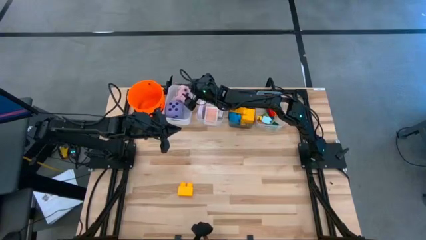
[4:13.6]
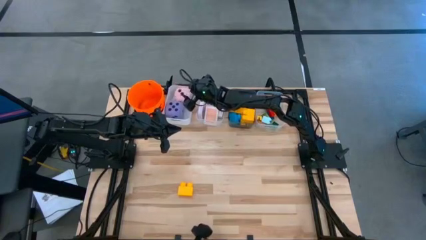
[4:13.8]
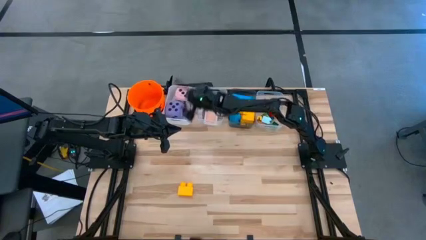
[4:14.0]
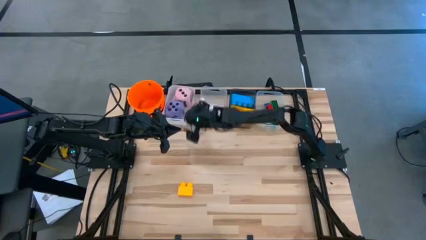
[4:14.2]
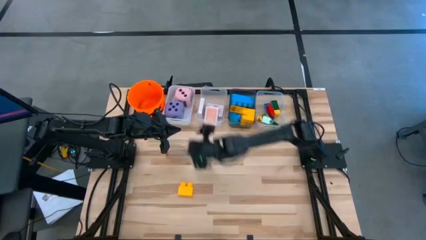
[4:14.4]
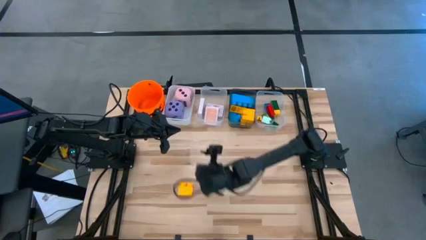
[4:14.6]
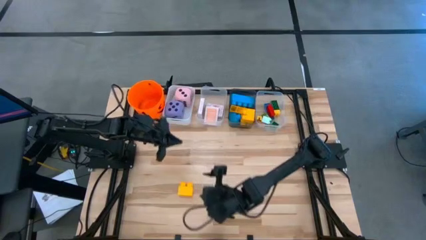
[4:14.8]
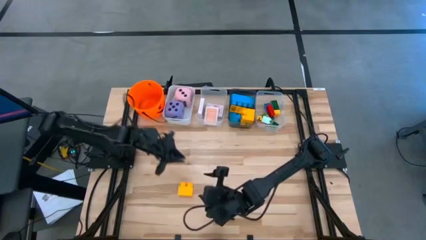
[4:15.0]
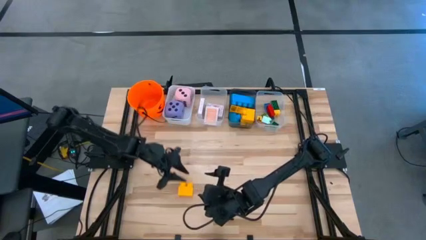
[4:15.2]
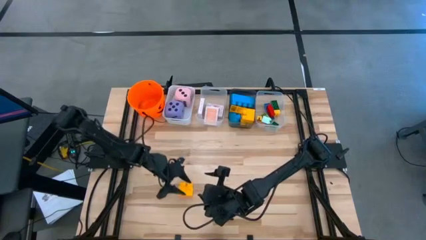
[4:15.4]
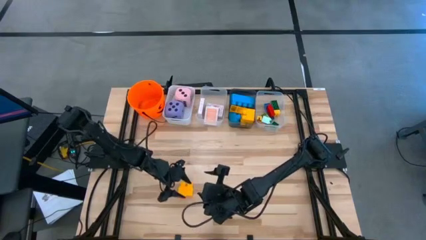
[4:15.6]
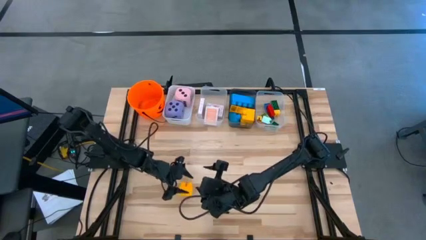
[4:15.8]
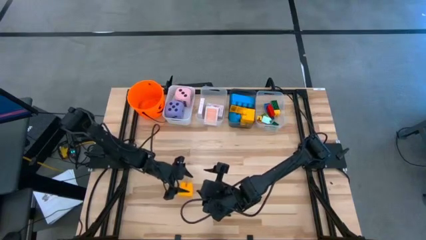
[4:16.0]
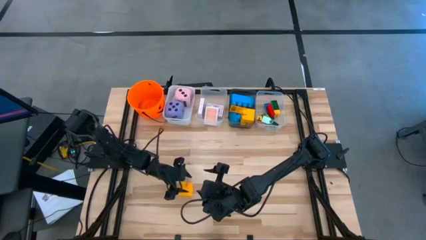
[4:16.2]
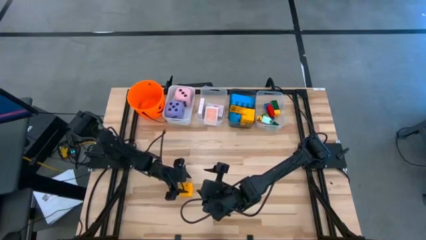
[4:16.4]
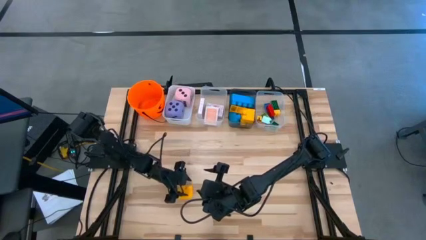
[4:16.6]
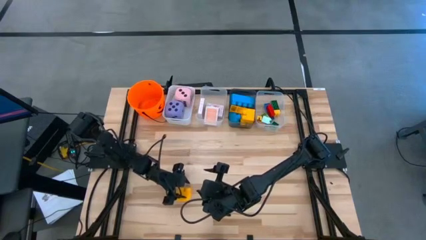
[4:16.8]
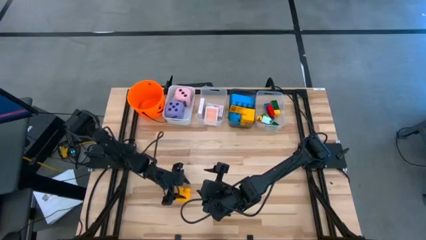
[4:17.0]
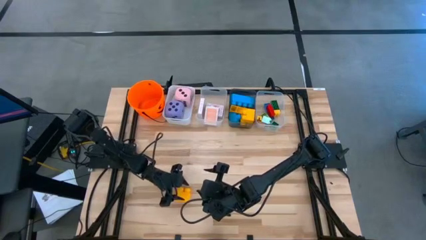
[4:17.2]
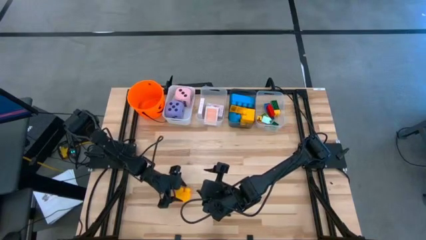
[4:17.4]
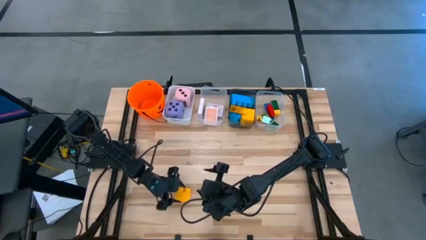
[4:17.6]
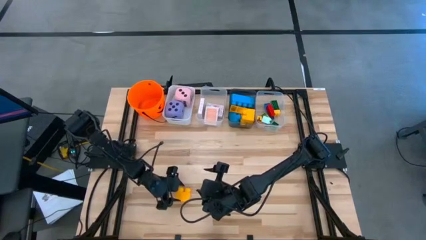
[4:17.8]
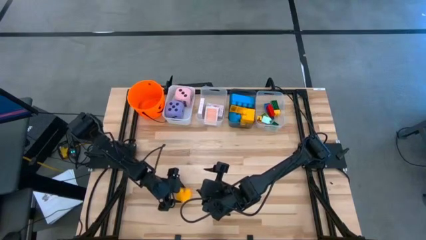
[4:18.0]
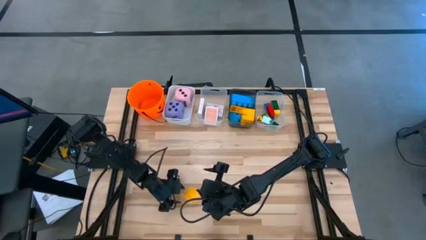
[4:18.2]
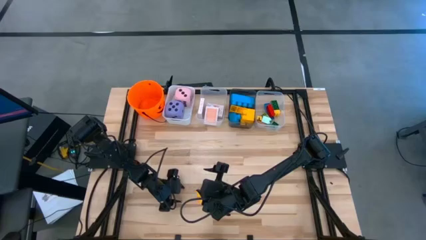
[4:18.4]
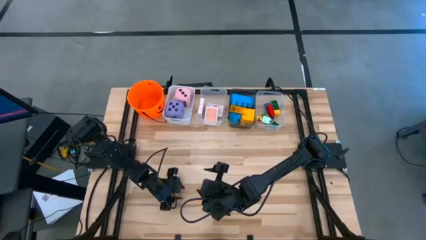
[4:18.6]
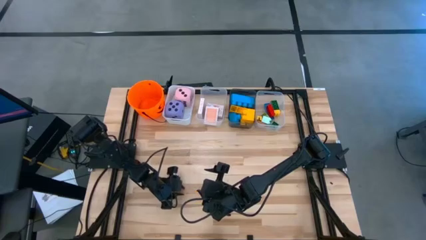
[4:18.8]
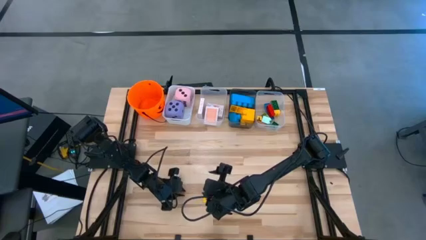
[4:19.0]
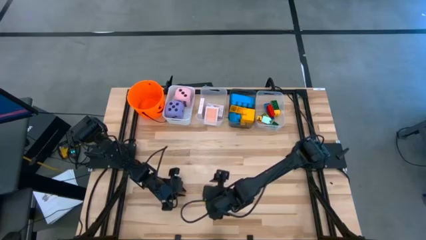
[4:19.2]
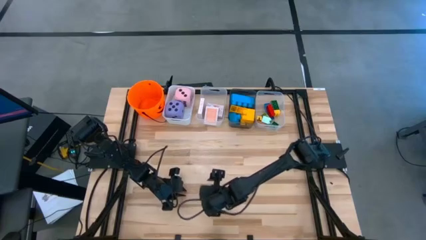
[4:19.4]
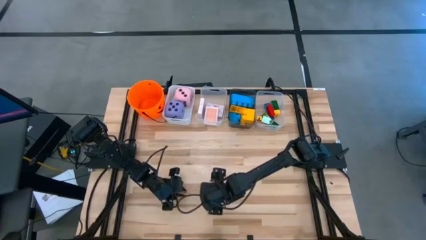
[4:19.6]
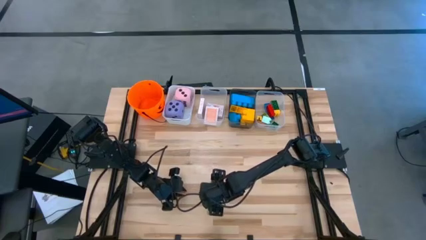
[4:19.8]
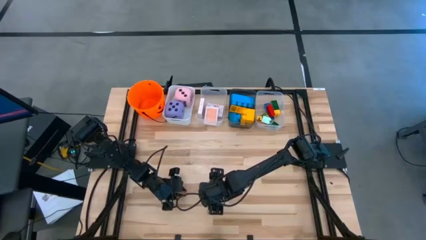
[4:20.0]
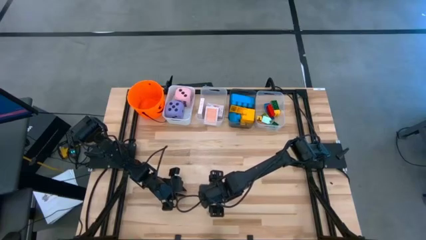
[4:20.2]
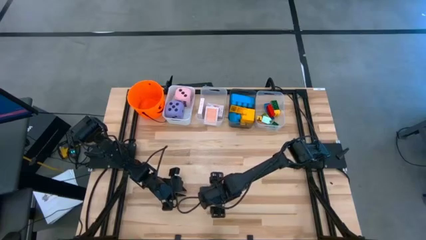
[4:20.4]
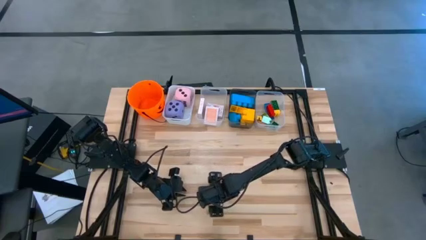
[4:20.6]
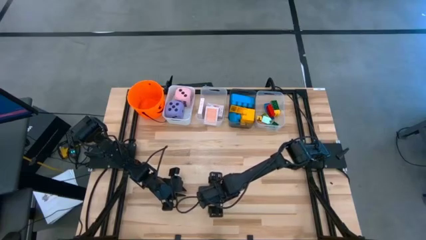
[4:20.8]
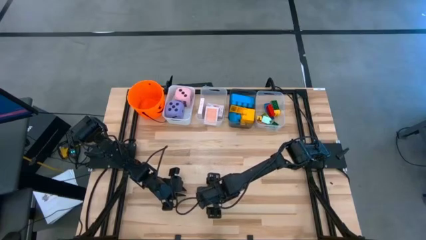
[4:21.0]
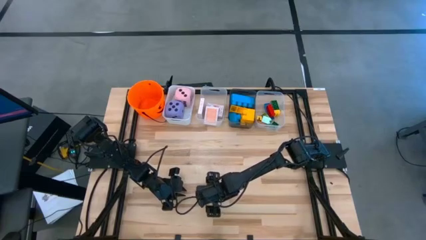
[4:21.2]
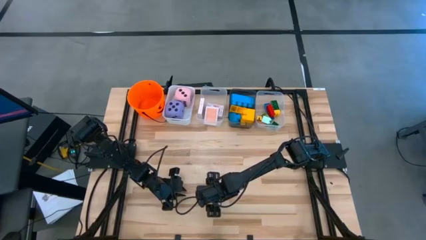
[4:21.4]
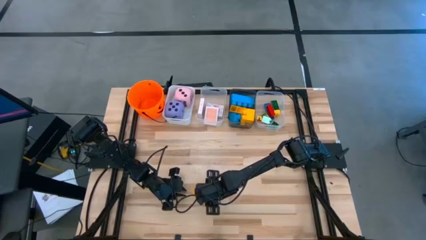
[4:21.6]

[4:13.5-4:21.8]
Task: Pick & Place Toys
Put the large yellow game piece into the black bin

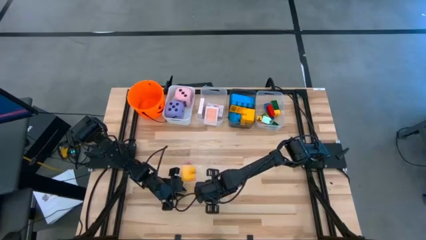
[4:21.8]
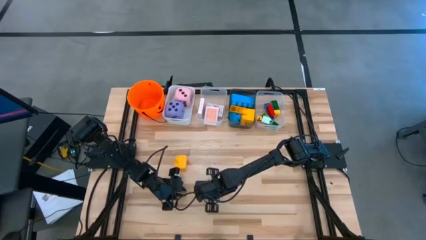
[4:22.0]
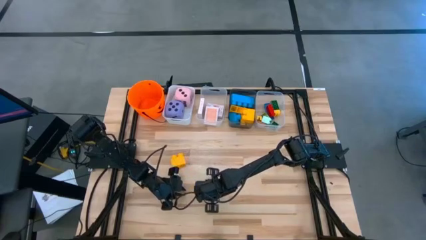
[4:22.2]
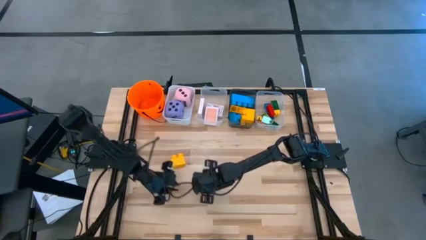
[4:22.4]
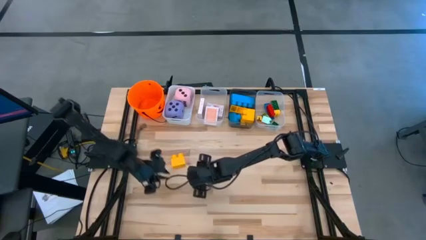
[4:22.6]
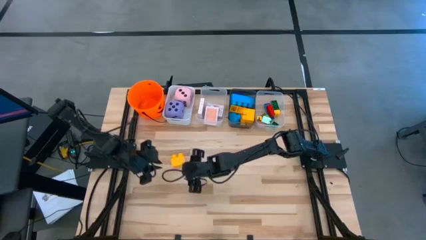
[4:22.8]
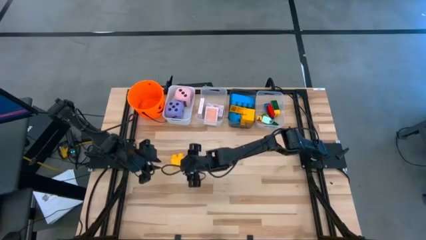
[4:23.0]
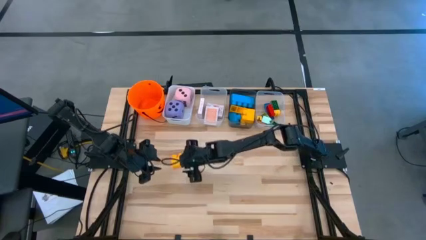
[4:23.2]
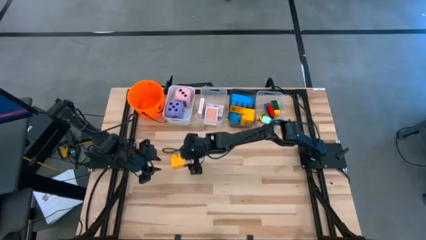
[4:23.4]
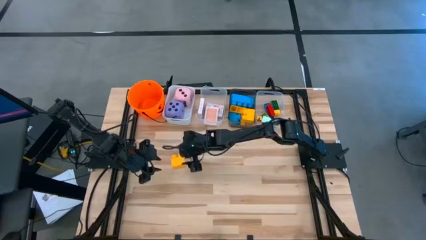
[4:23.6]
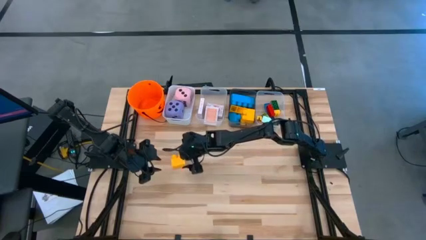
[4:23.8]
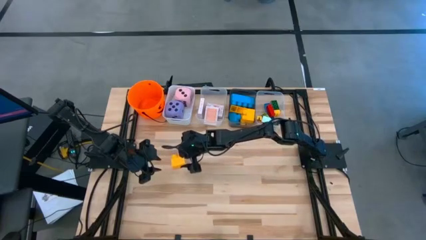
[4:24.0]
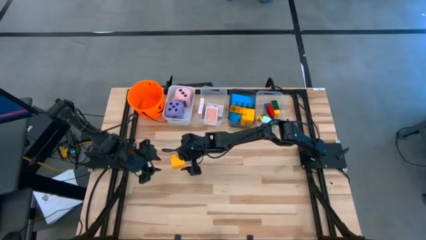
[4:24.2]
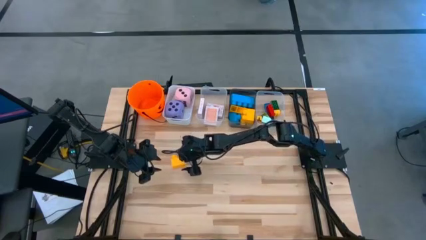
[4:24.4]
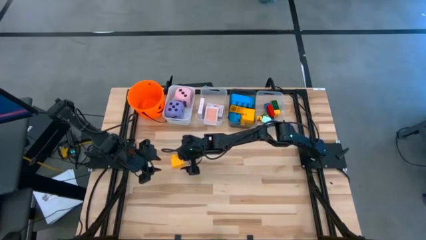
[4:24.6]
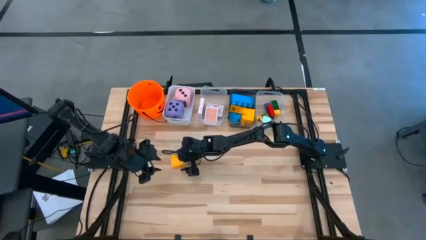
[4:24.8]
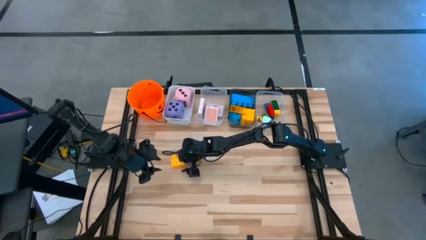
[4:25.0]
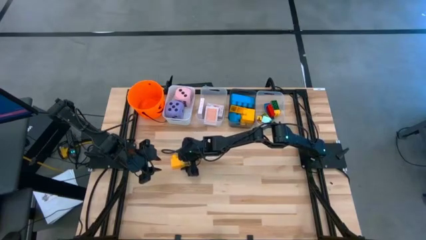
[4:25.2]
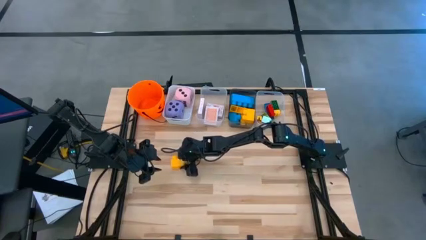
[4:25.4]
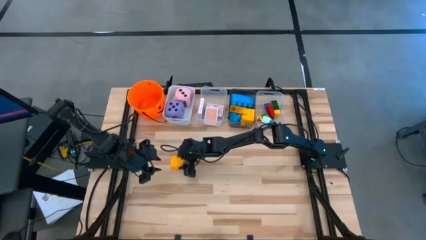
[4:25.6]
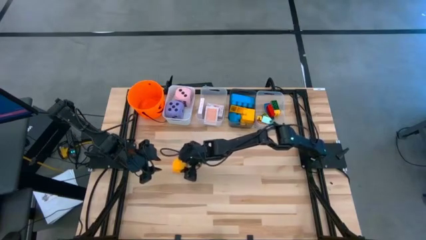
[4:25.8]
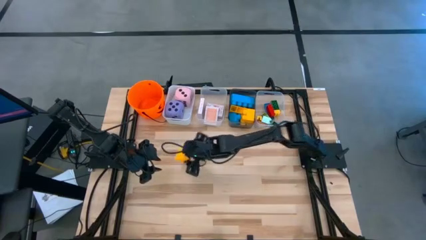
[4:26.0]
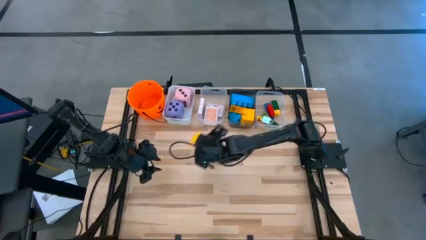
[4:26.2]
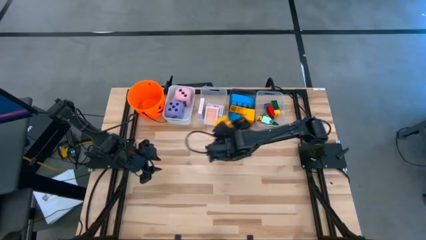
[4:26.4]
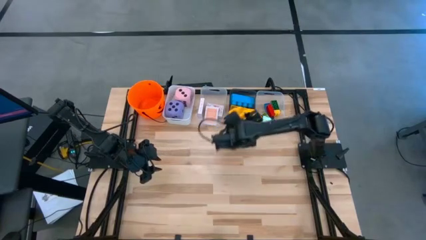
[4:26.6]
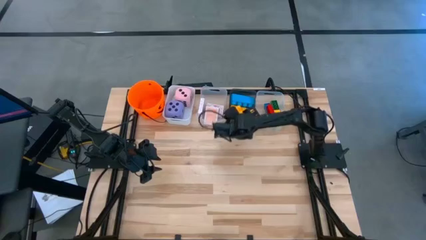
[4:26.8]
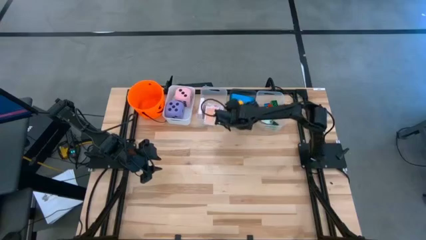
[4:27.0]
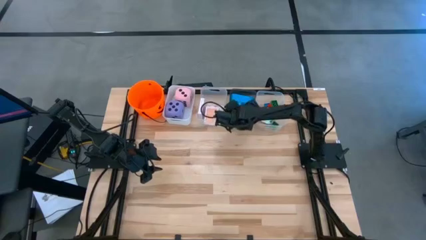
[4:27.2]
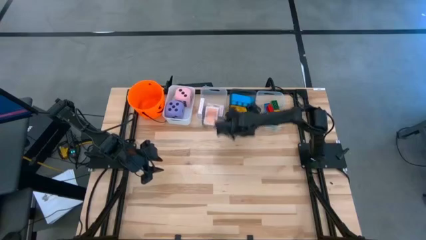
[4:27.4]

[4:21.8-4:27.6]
Put the large yellow game piece into the black bin

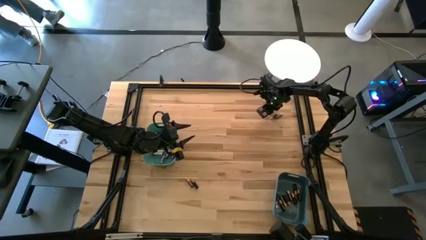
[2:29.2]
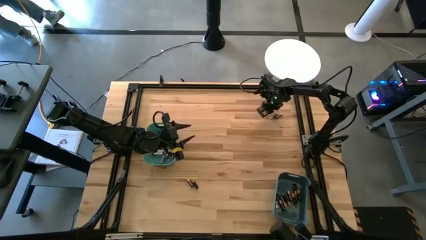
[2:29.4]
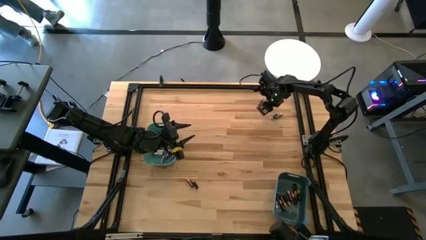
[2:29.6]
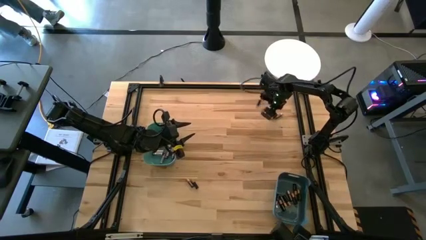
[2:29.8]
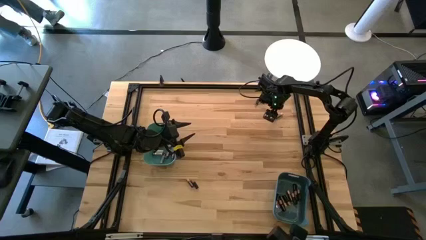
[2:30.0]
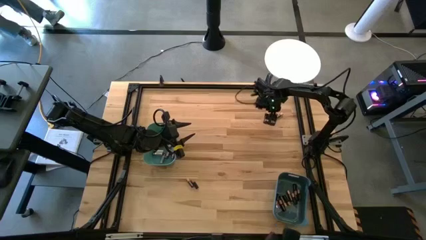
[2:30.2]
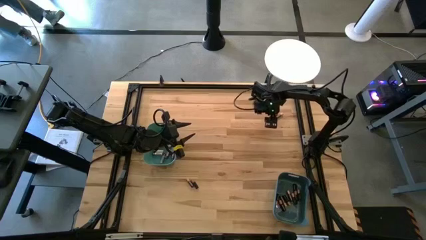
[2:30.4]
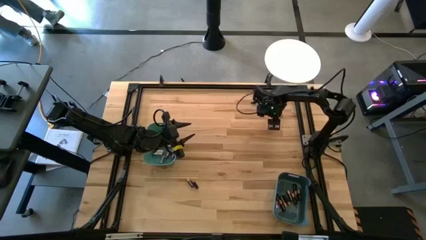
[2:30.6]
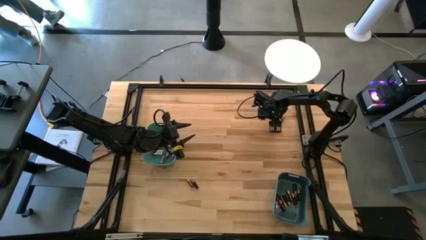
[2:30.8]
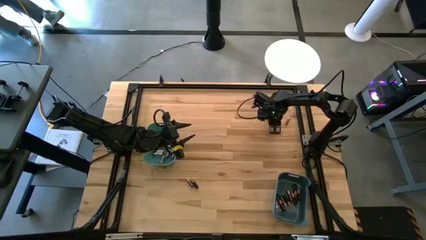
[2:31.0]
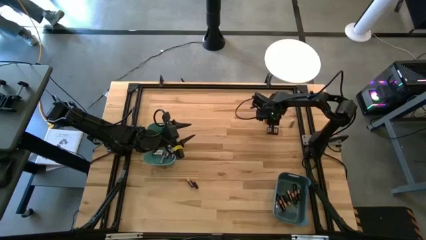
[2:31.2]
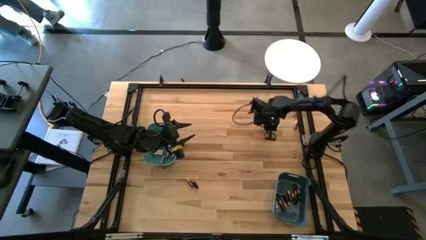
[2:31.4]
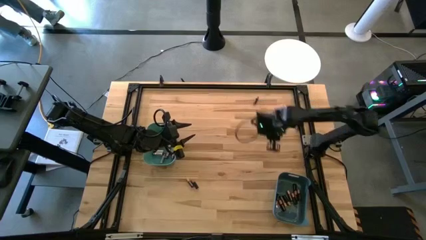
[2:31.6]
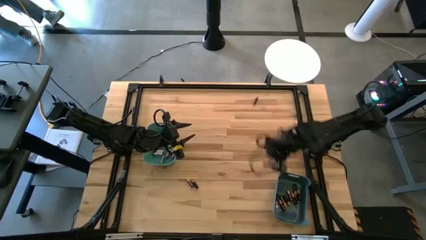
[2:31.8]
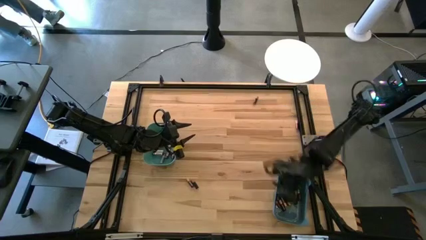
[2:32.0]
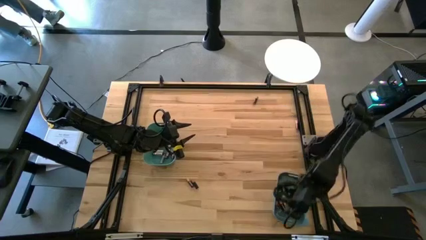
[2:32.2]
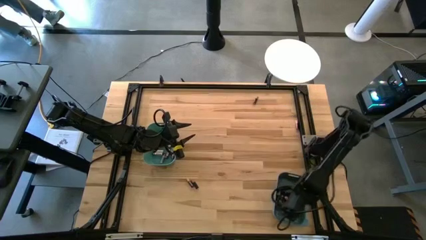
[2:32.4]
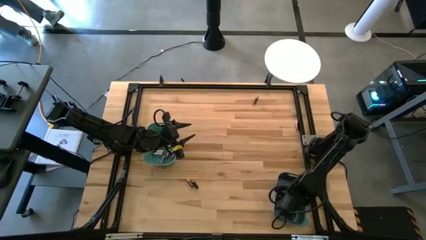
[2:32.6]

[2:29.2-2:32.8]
Task: Sort batteries
Put the black battery into the blue bin
